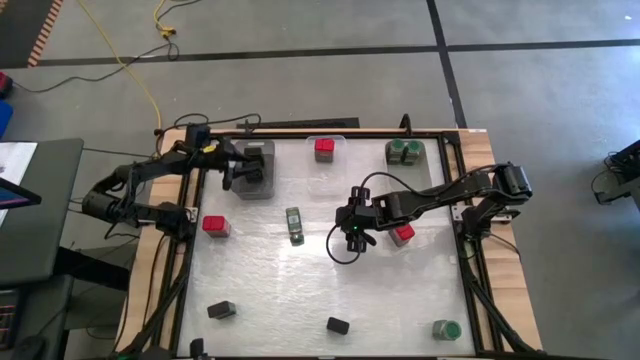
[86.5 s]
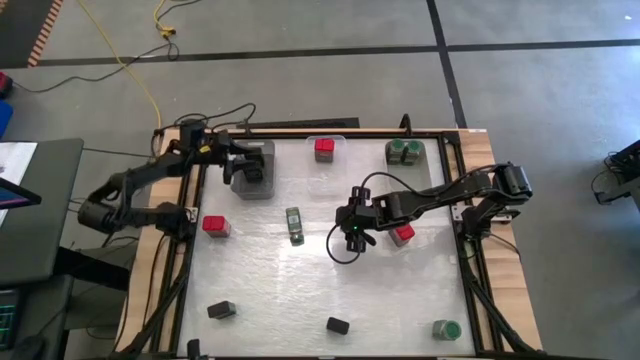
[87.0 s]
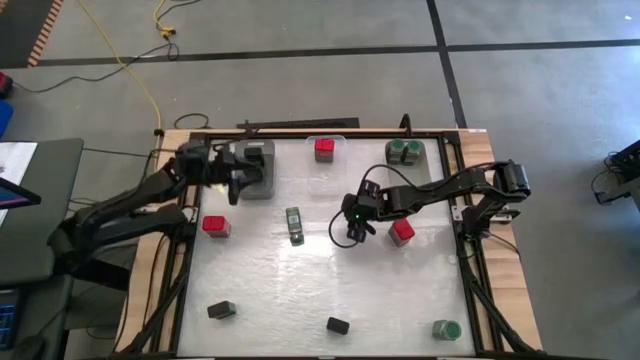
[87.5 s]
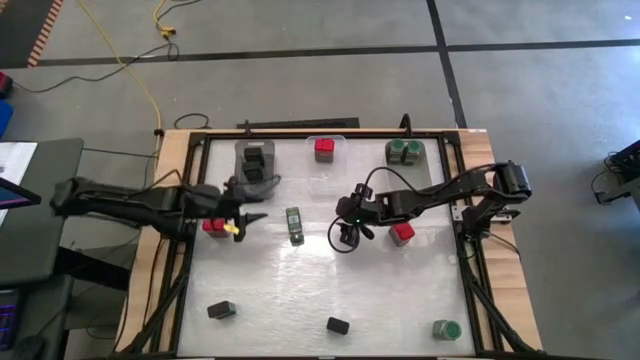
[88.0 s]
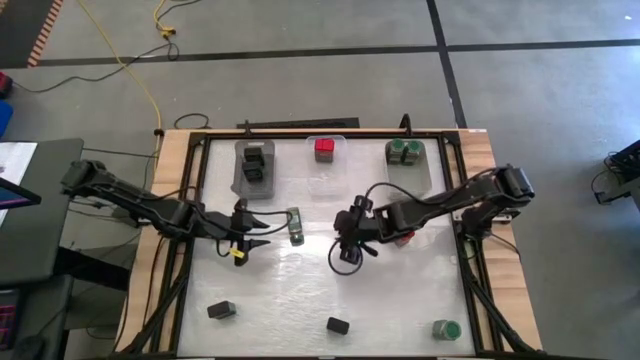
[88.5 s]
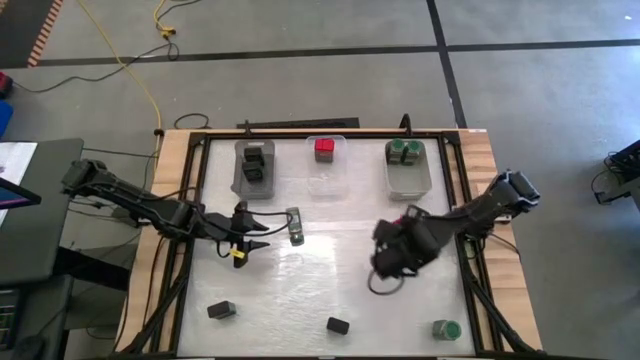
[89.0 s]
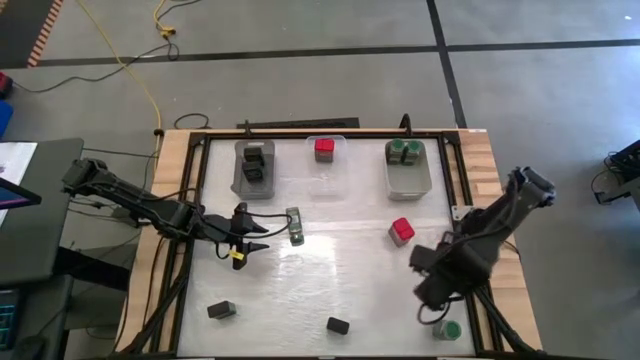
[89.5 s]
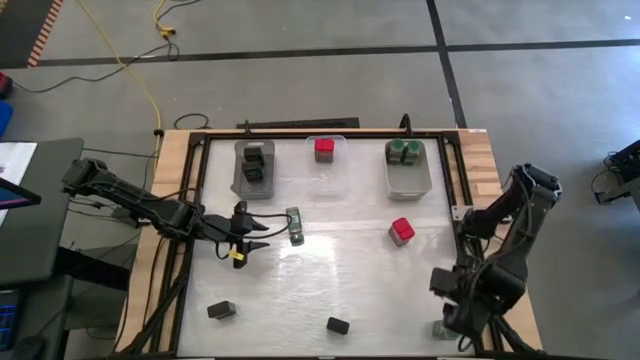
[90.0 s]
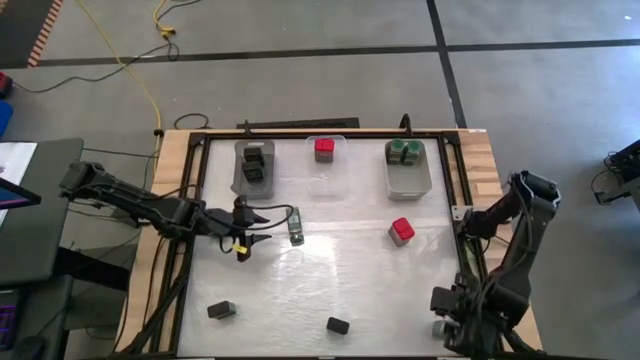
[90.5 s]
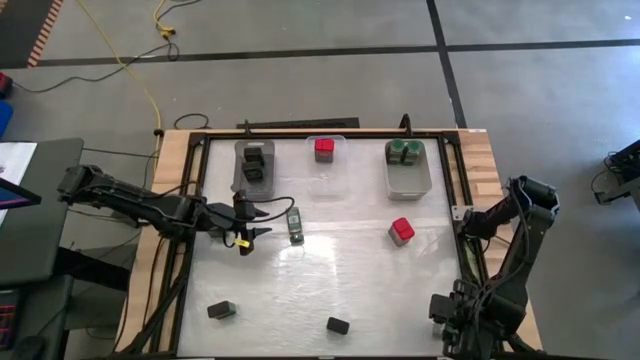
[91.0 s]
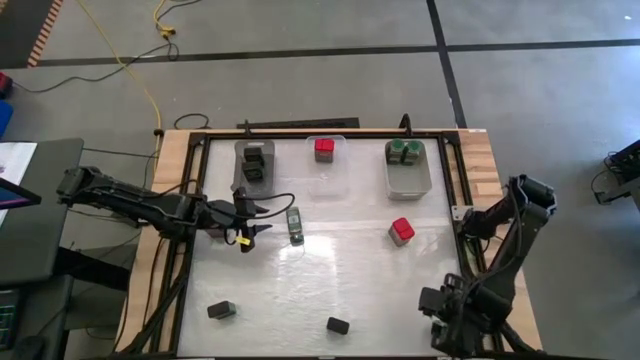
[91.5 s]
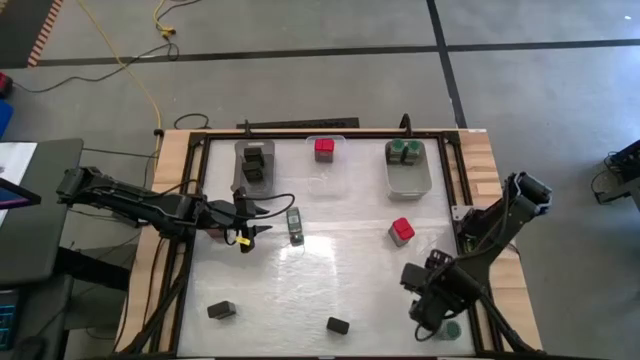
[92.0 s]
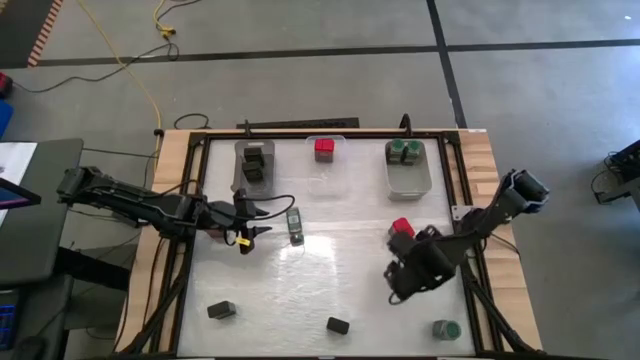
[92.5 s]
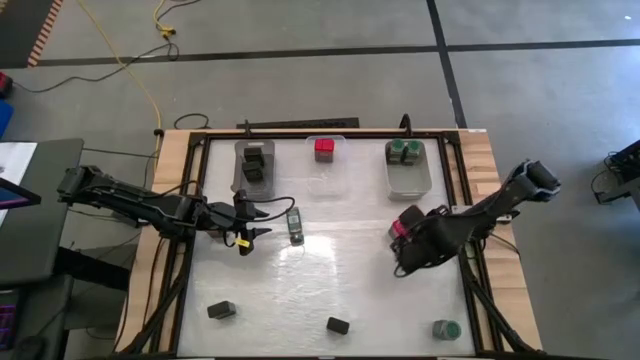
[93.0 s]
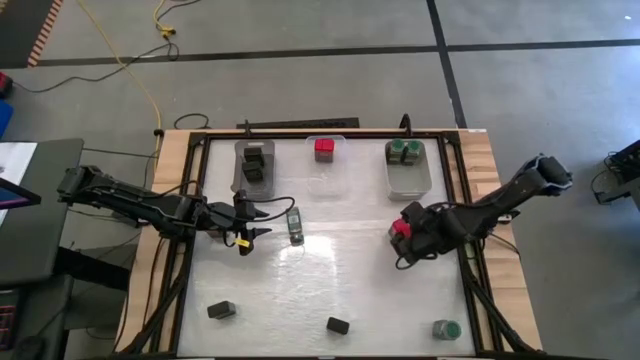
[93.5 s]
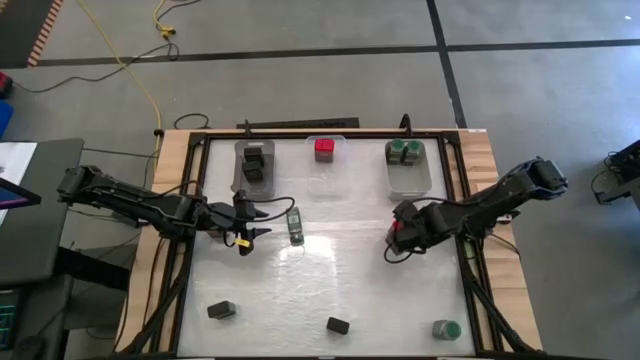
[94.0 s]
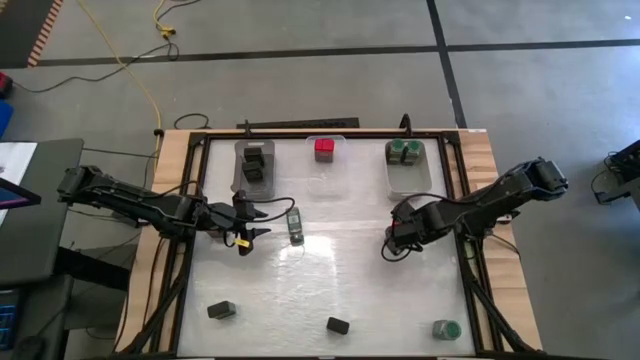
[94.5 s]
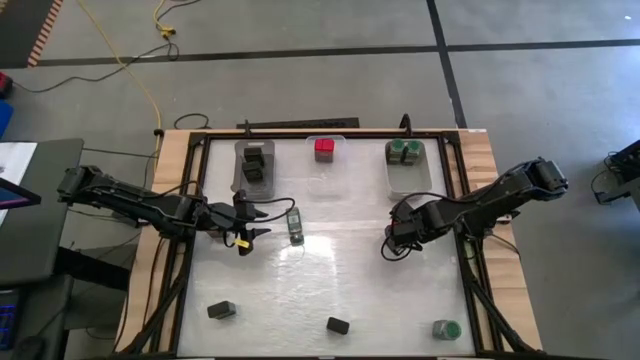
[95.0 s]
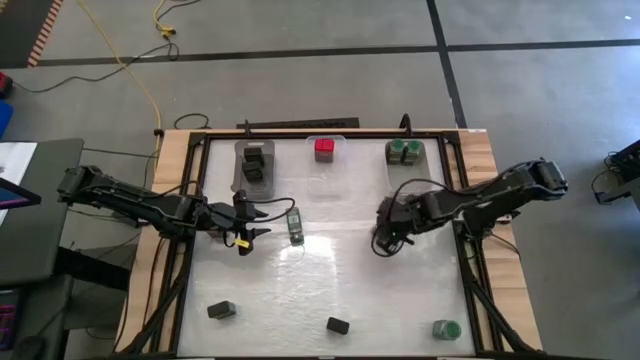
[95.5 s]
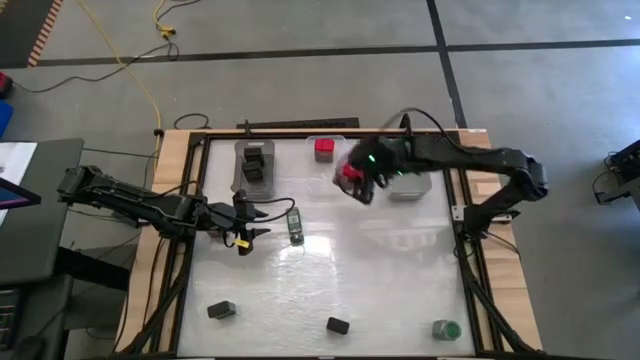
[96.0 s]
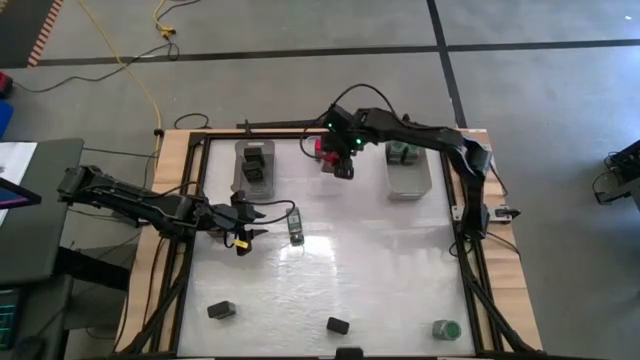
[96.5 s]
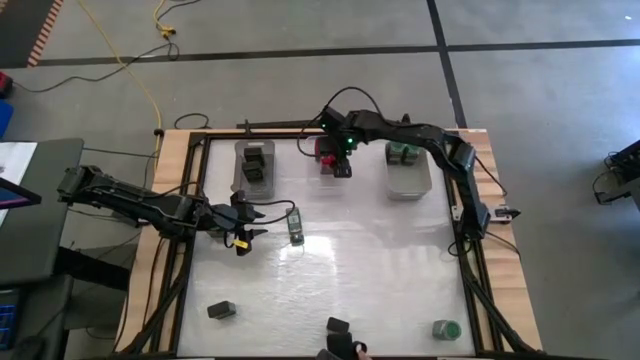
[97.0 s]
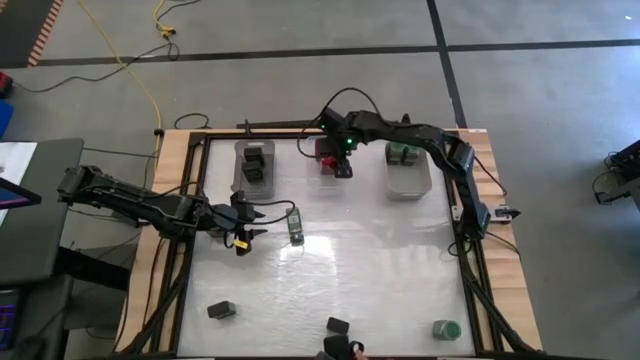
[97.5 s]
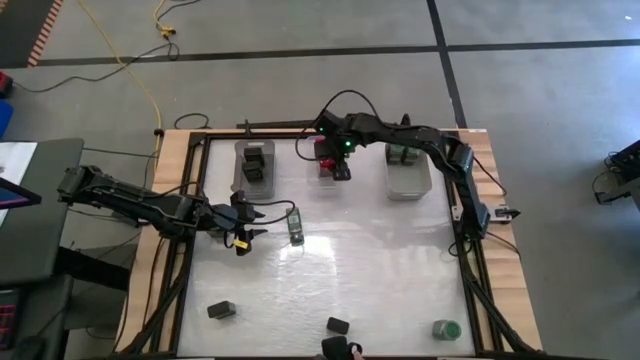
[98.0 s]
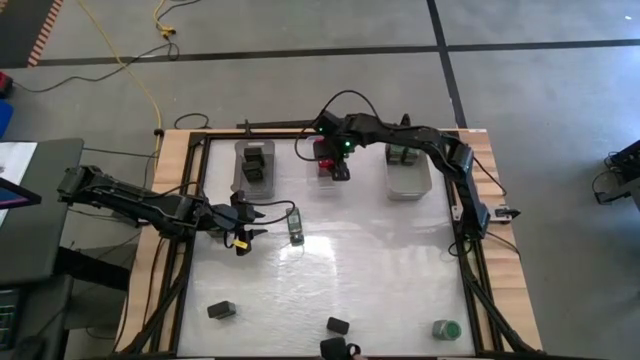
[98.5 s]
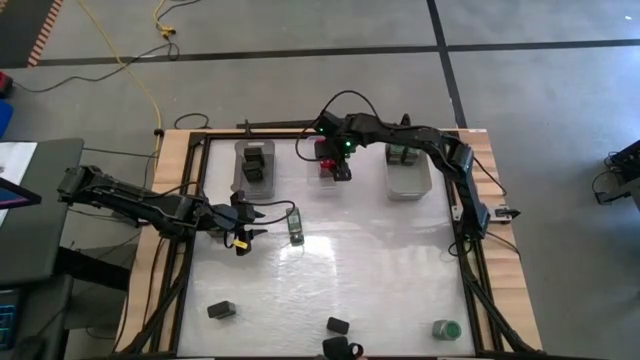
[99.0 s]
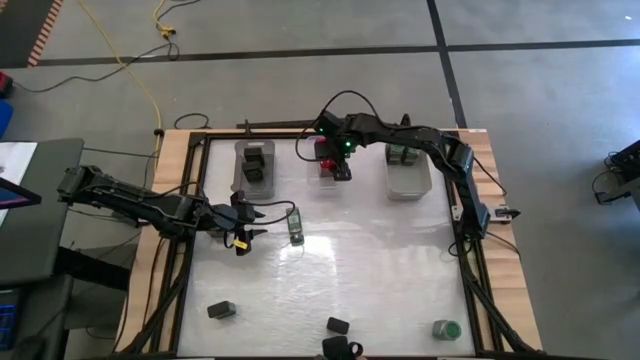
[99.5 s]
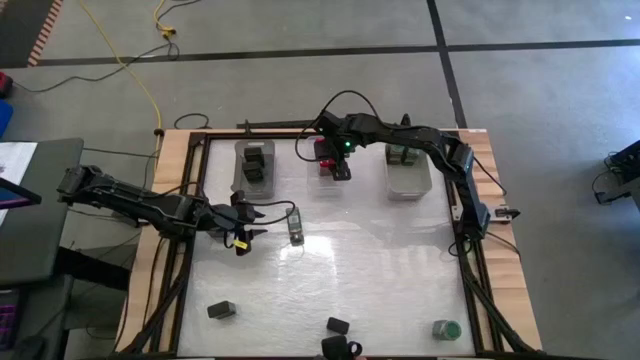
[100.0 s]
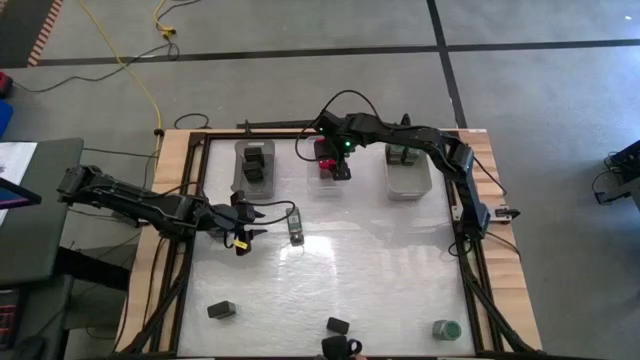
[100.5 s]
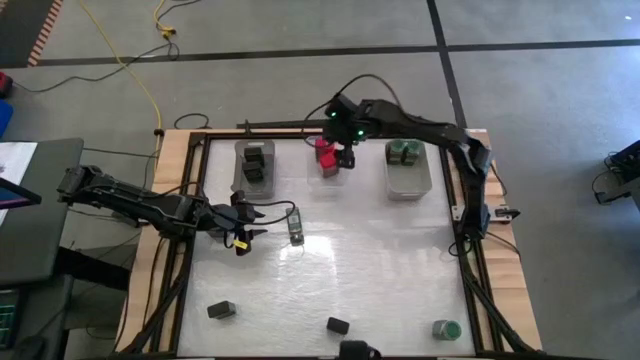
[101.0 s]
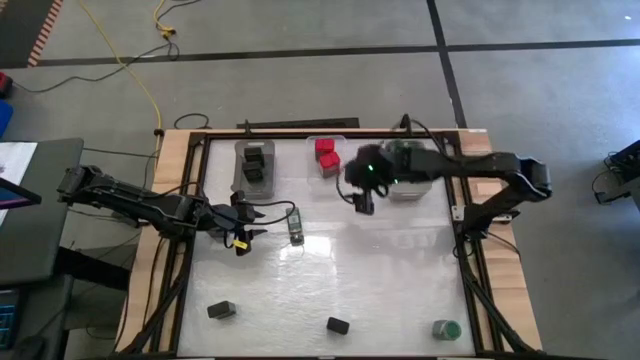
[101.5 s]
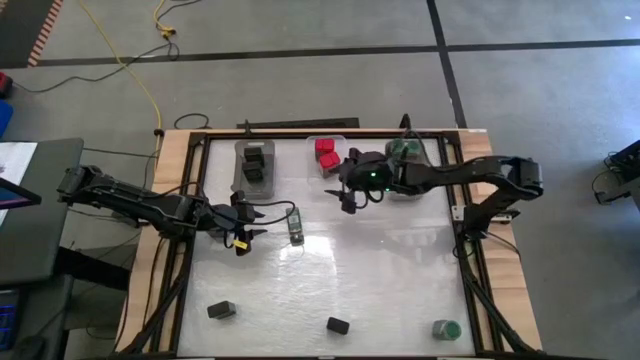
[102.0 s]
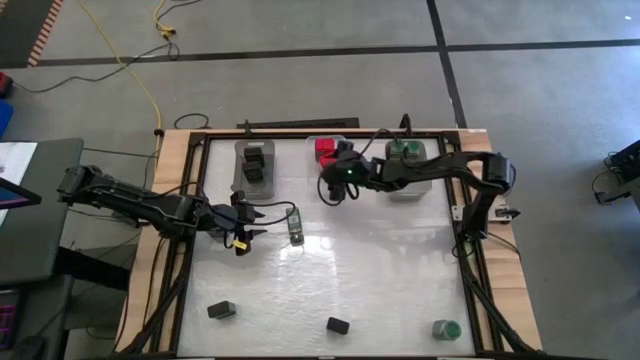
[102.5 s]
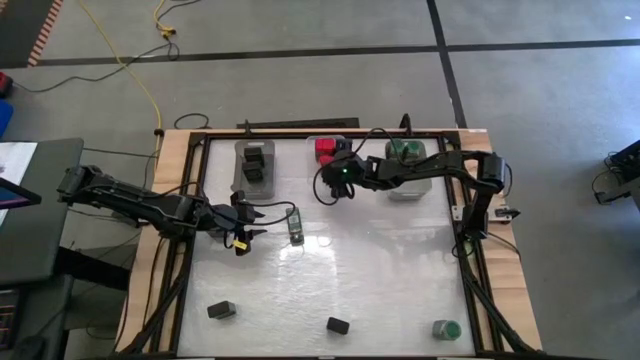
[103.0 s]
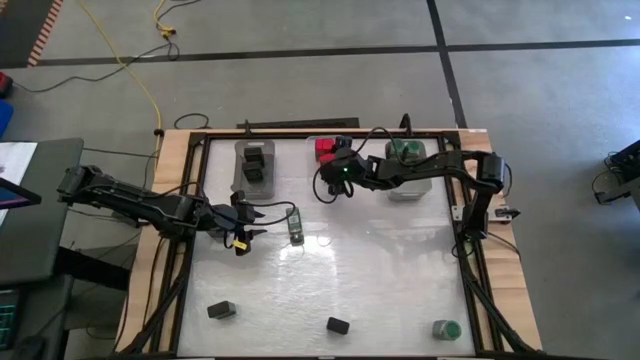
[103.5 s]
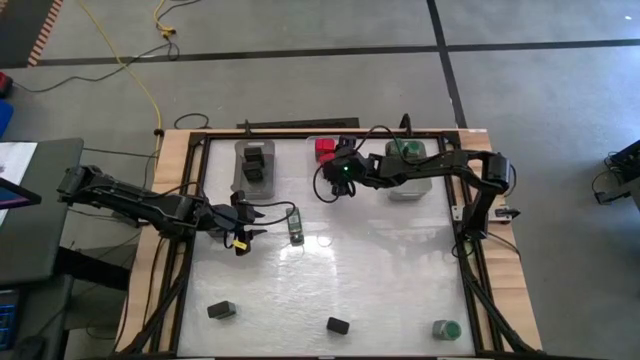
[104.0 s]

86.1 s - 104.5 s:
Task: Sort spices by type
Put the red seasoning can into the transparent bin
